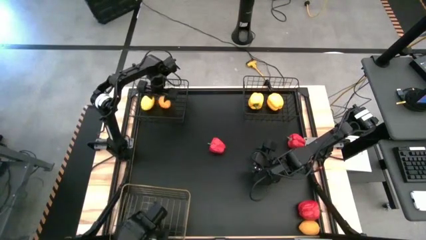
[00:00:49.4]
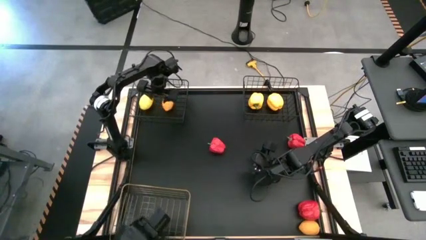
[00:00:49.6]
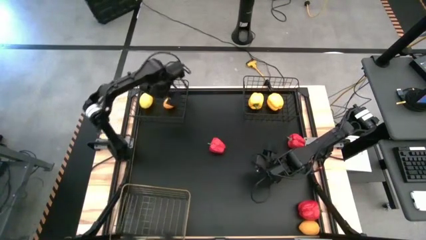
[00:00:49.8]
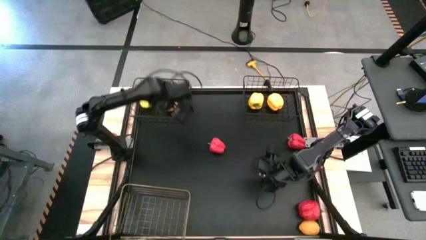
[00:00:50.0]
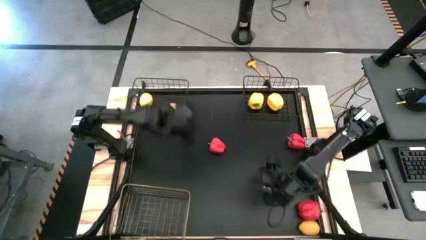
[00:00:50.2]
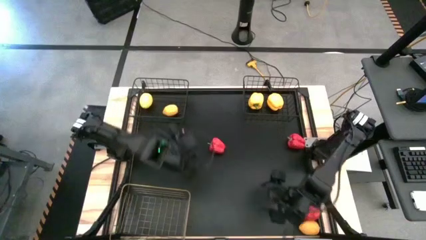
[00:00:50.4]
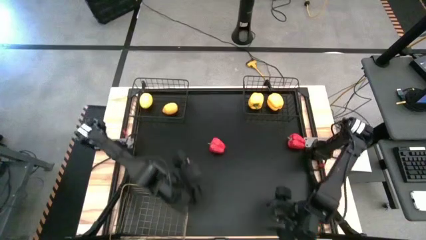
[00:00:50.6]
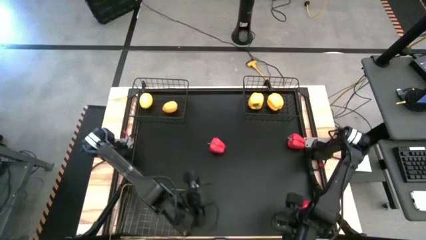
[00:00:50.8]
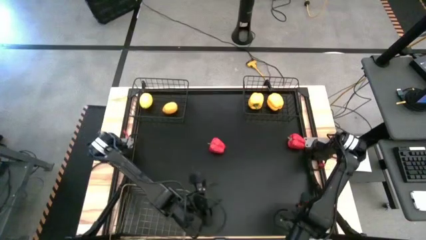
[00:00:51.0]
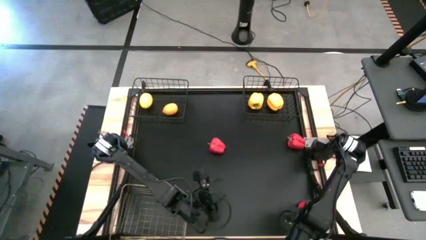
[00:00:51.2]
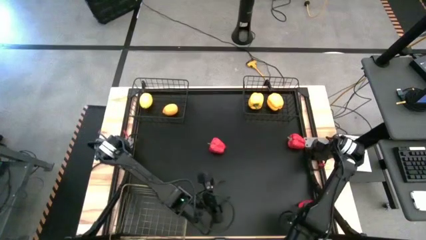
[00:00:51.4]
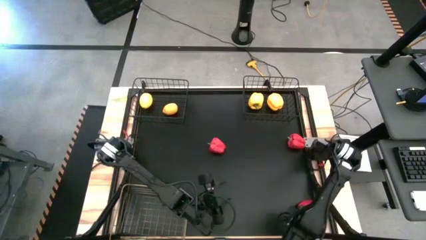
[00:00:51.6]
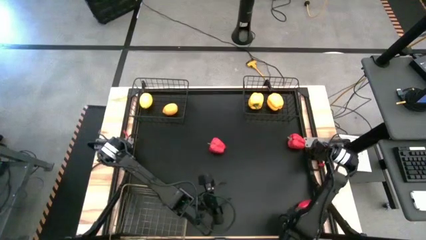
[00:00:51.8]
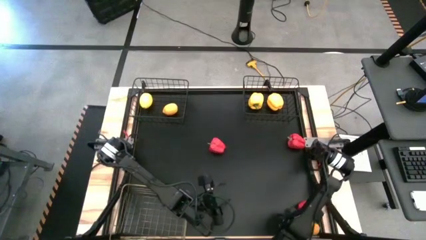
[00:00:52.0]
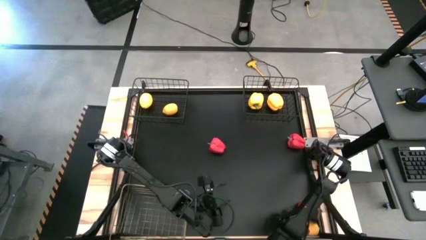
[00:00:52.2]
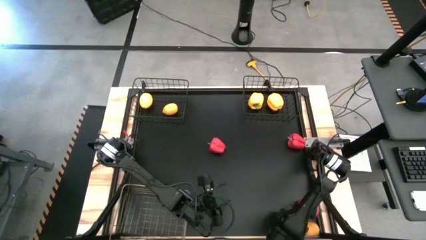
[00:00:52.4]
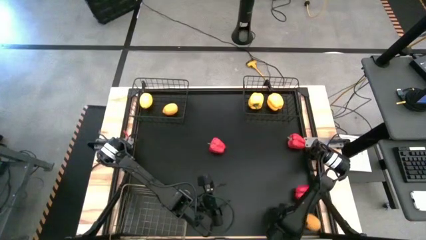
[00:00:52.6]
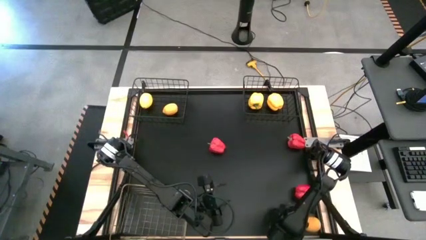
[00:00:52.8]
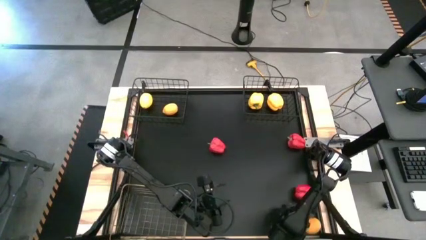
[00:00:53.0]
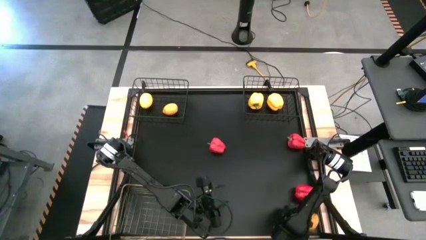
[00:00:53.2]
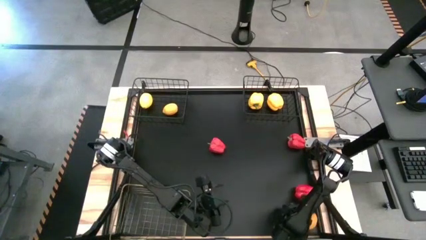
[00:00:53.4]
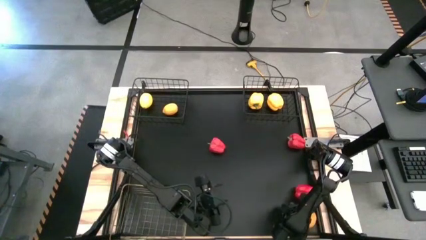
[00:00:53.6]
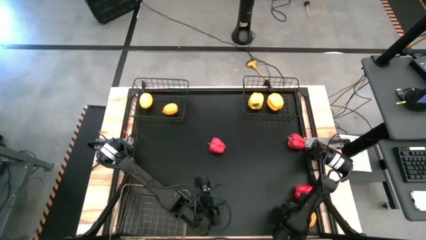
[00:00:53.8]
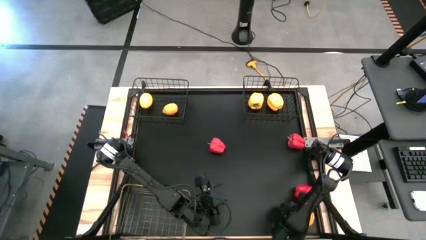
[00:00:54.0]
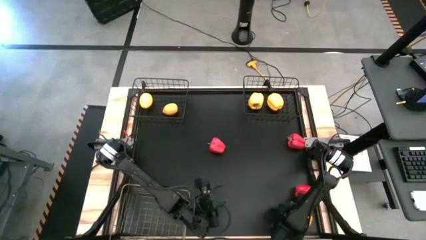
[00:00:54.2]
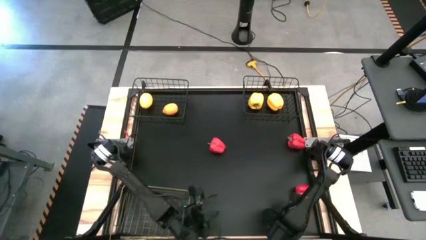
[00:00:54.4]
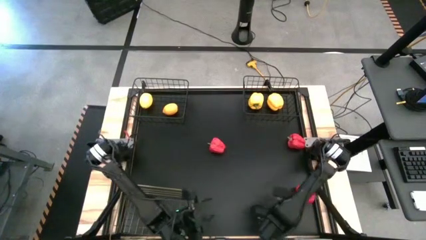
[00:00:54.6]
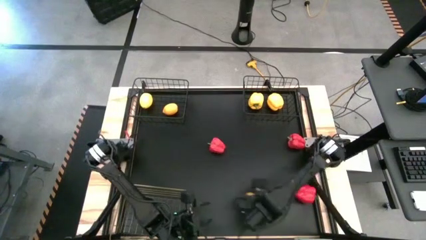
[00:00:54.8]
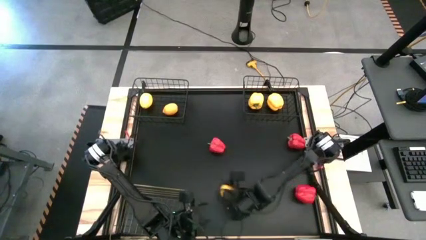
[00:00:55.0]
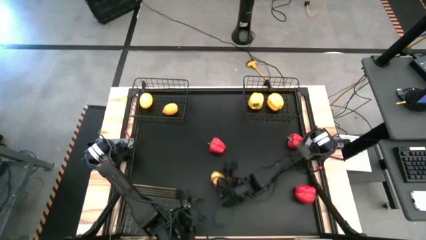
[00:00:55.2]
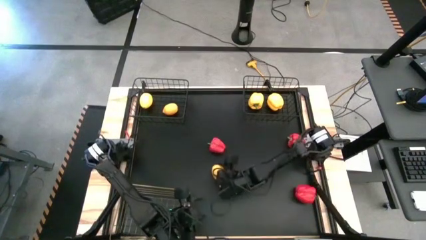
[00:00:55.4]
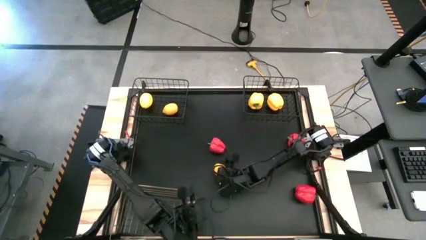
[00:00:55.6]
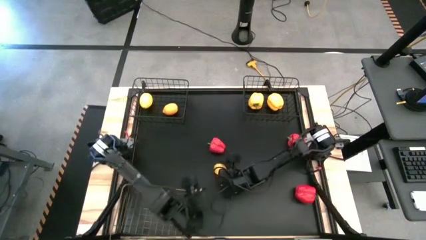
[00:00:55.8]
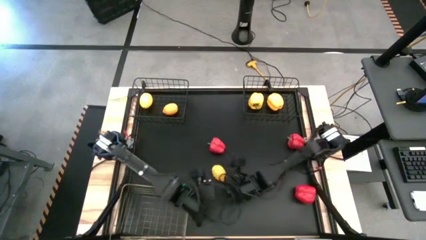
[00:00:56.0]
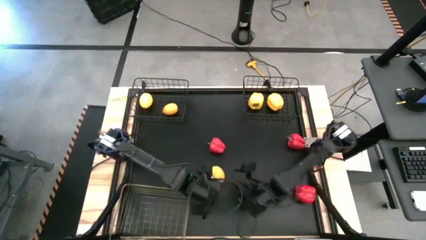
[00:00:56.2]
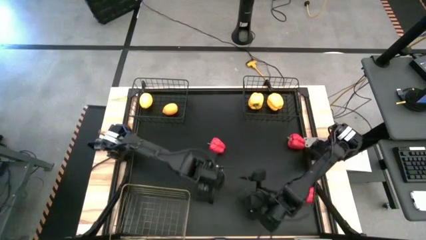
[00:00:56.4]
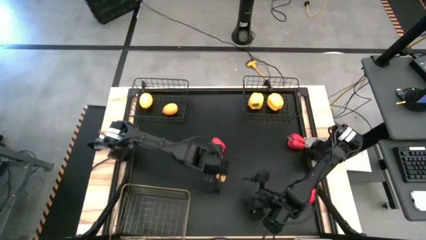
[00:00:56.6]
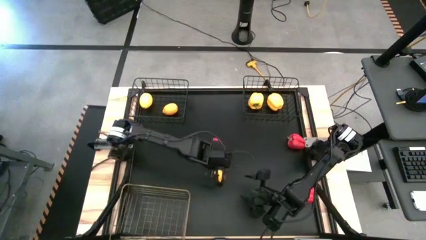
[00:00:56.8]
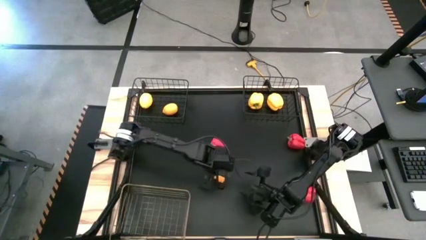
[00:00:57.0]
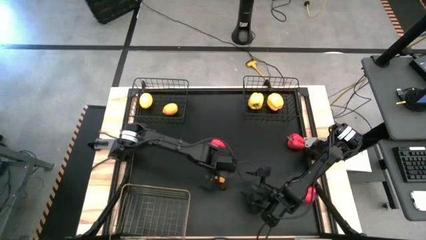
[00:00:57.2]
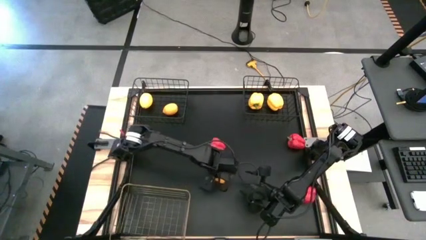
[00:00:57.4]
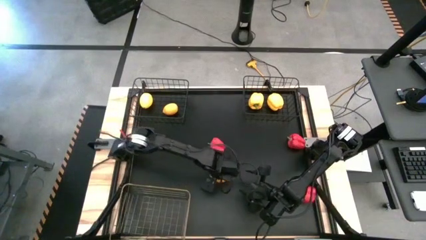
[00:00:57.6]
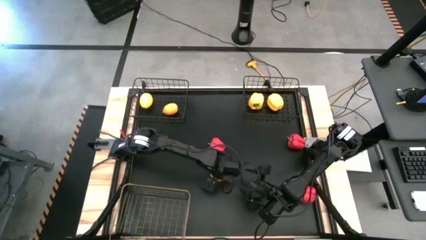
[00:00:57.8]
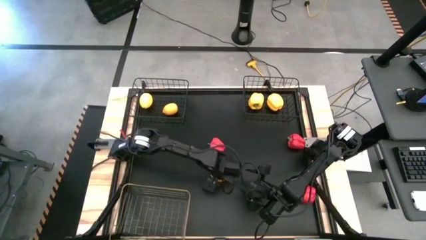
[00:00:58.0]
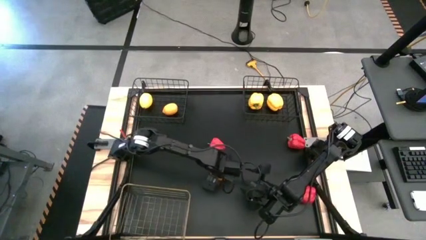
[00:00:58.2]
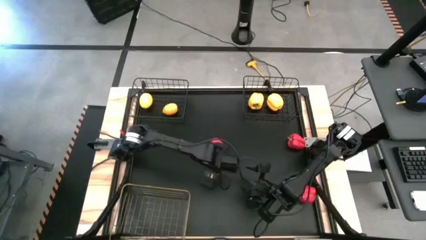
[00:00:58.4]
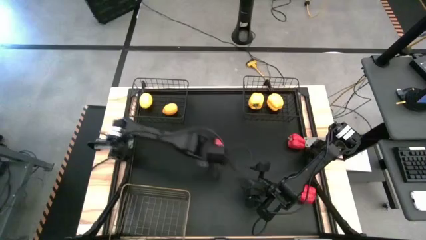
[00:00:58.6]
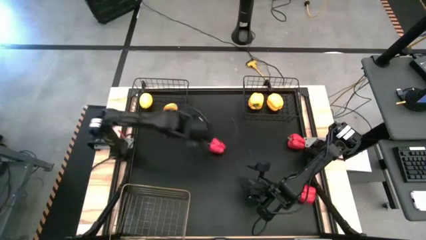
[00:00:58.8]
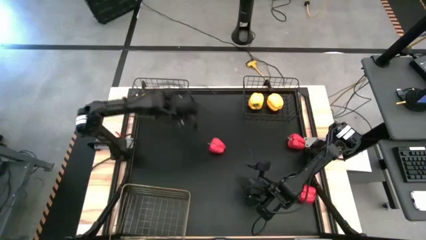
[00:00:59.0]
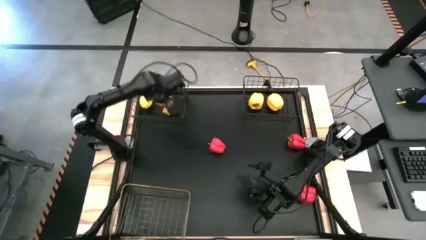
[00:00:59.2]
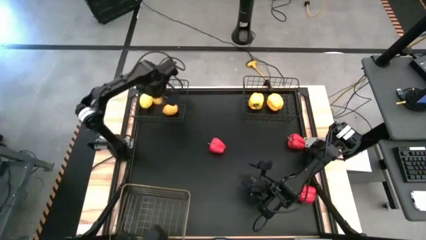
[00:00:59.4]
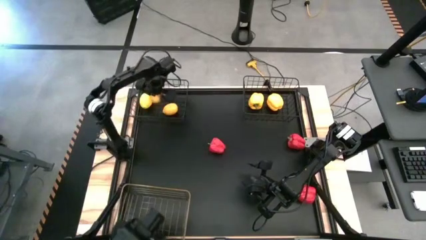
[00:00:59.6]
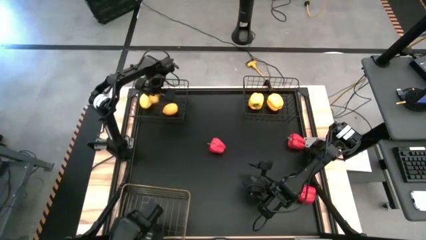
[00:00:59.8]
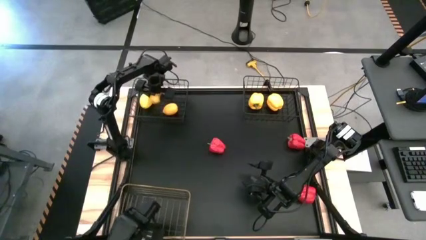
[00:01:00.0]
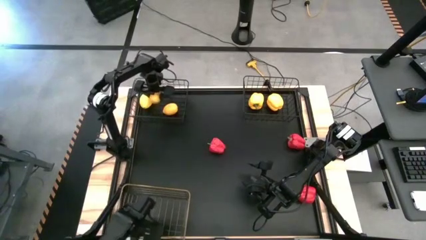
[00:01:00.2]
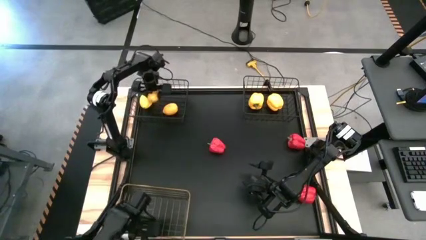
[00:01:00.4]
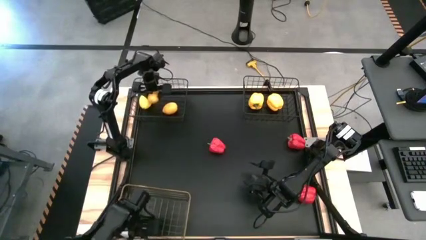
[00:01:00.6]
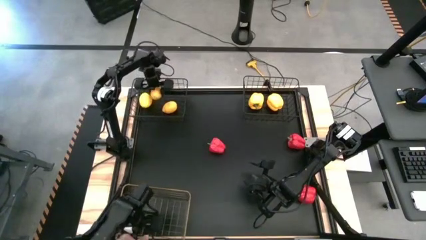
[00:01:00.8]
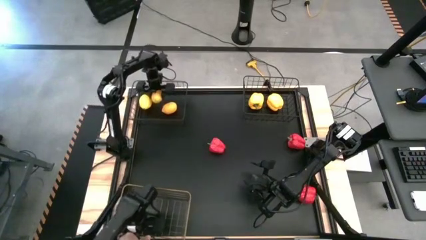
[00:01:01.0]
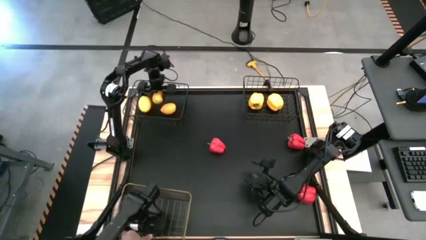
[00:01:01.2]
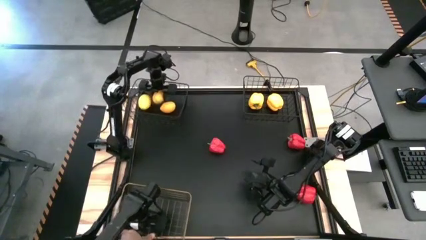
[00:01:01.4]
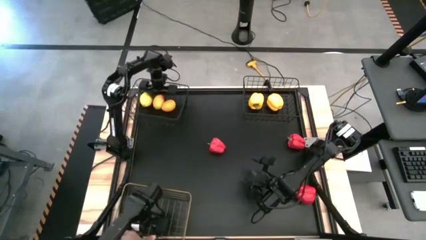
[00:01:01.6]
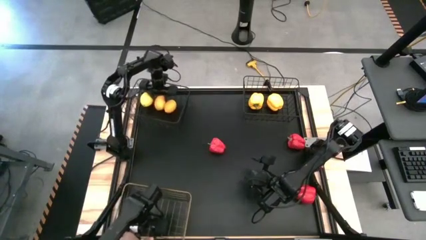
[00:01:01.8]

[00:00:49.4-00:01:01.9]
Task: Sort produce into baskets
Put the lemon into the left black wire basket

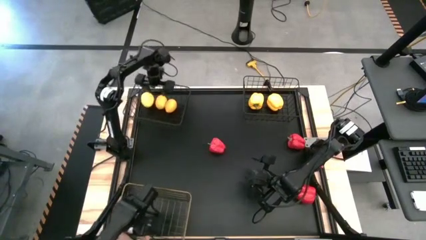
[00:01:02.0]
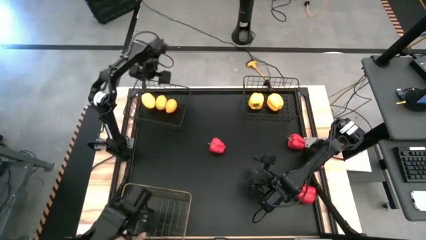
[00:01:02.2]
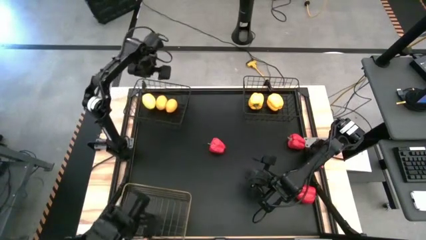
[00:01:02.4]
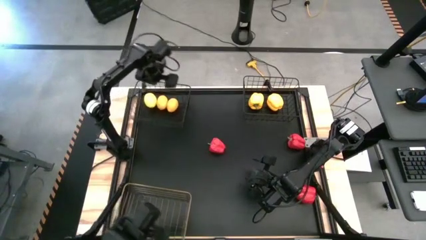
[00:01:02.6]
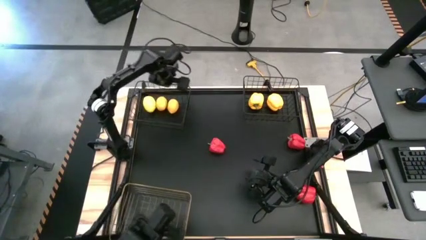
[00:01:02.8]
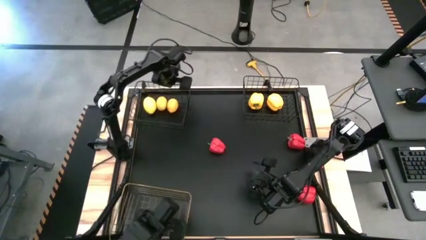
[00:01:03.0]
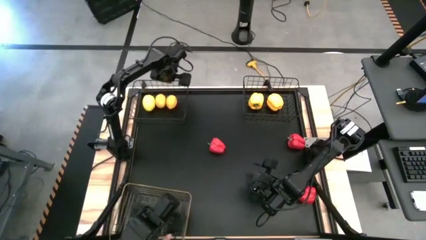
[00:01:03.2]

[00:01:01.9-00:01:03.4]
Adjust the left black wire basket
